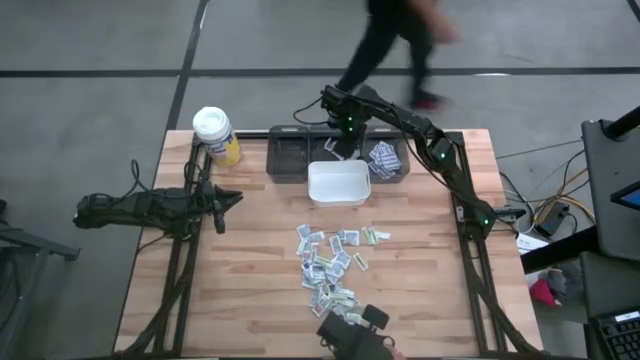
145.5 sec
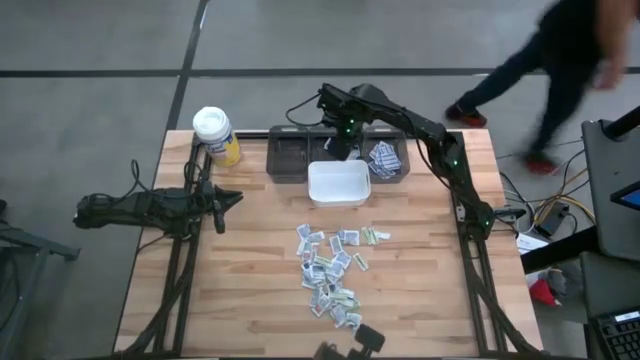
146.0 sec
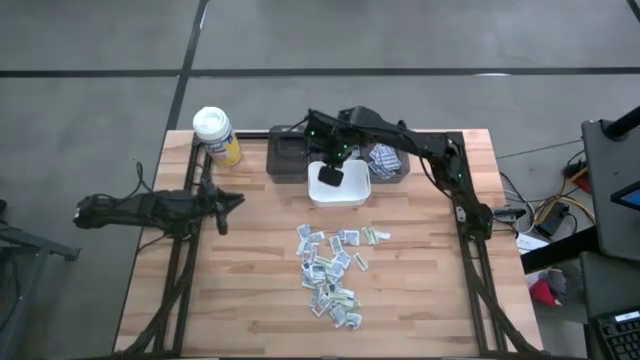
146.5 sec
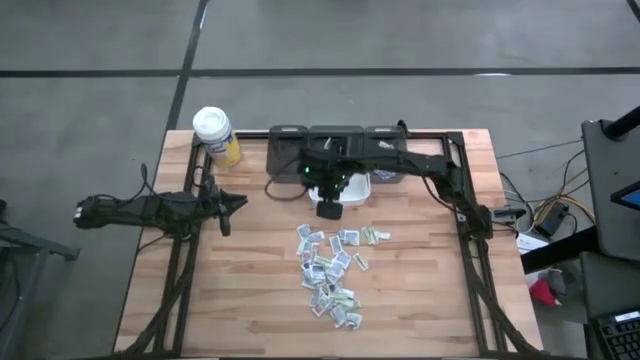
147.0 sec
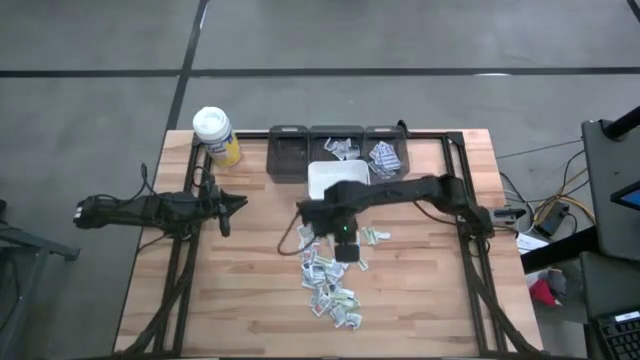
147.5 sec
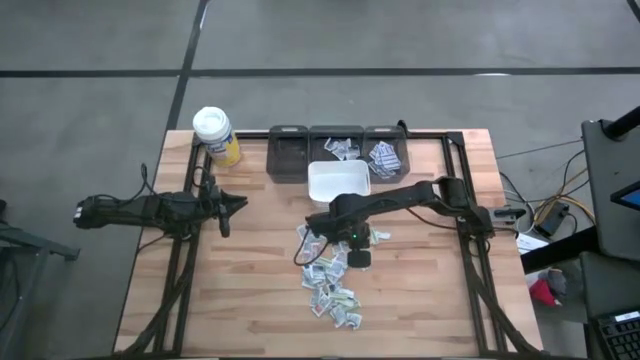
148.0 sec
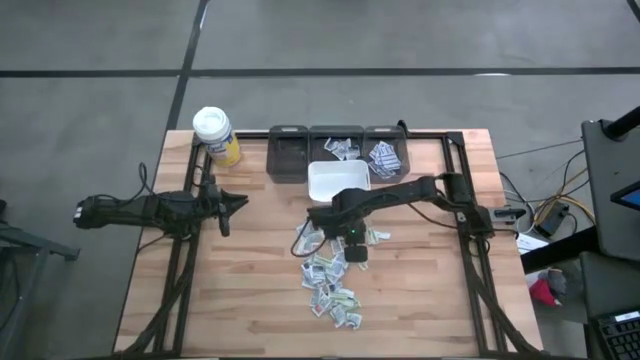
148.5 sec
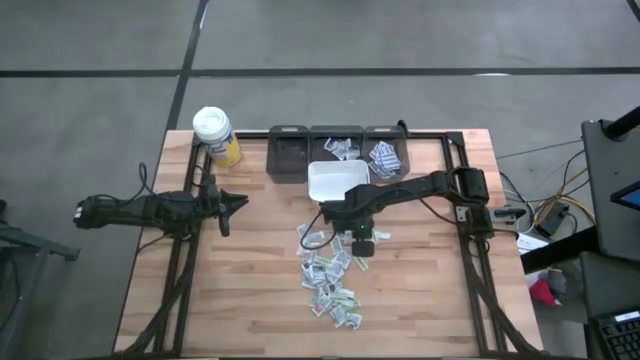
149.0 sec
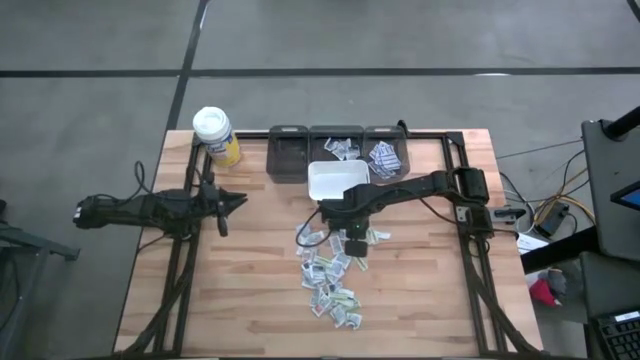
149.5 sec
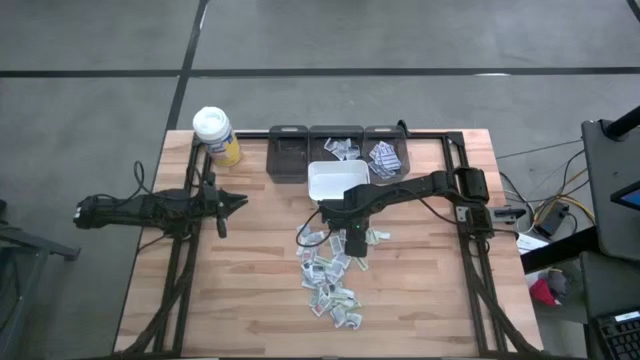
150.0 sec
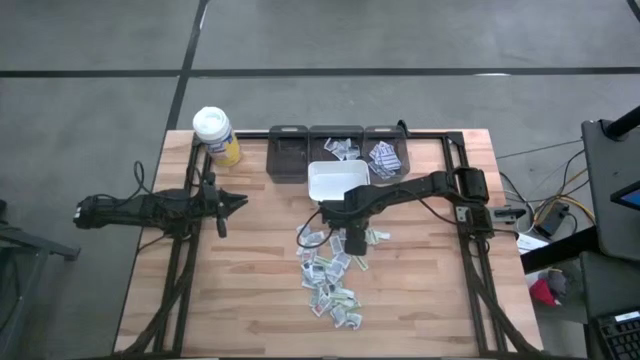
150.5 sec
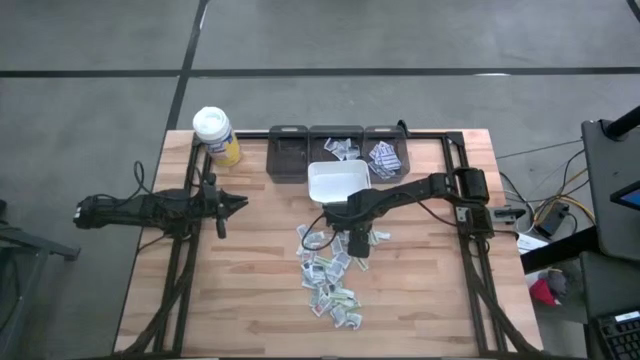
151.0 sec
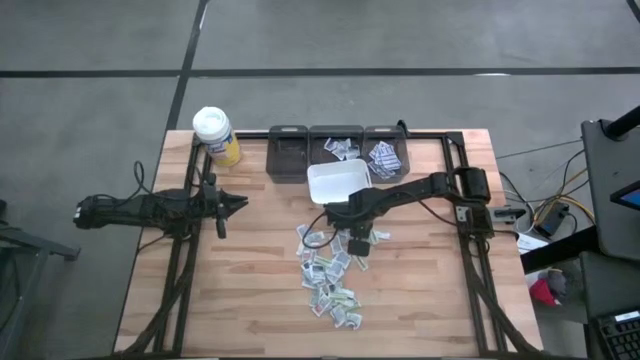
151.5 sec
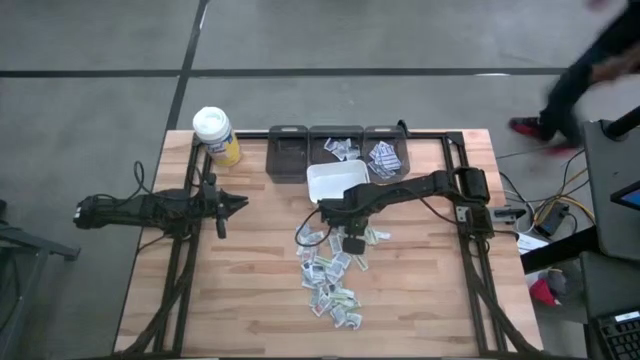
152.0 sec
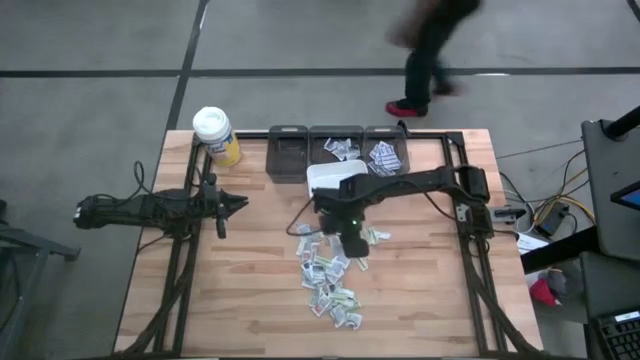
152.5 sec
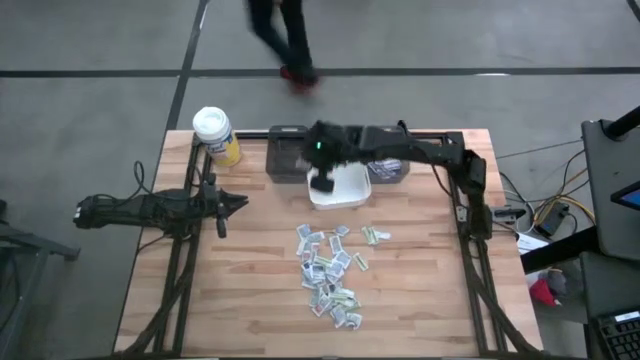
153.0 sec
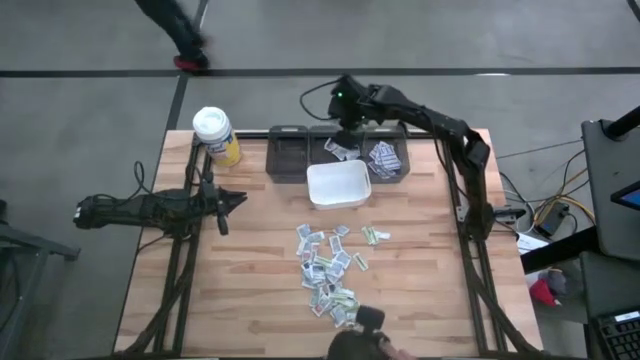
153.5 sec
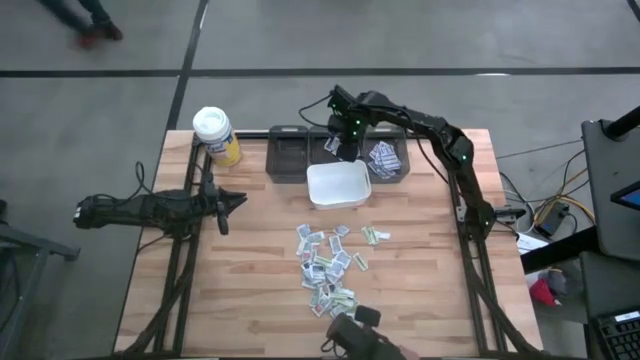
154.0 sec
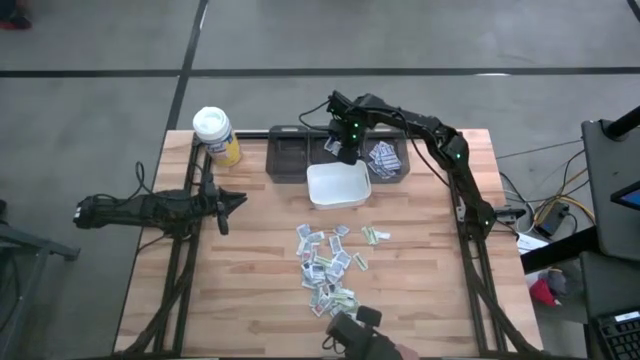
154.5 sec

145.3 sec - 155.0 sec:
Task: Pick & Place First Aid Supplies
Put the alcohol pad into the middle black bin

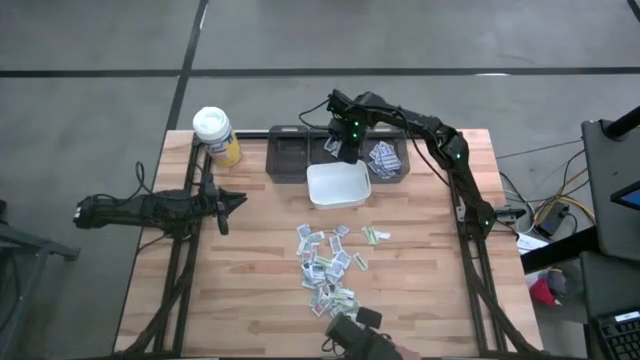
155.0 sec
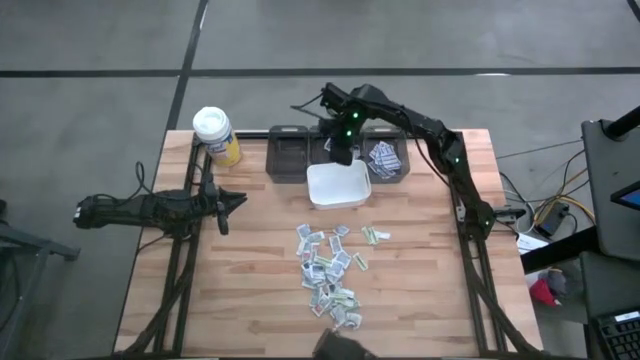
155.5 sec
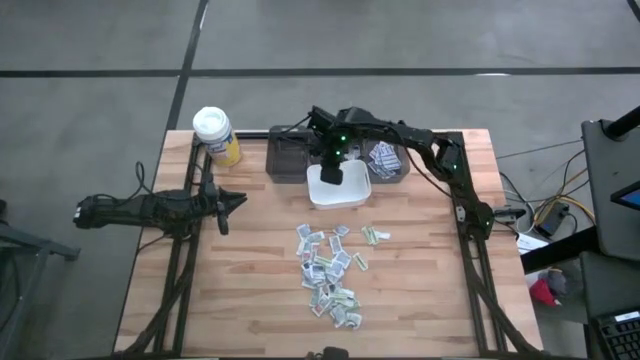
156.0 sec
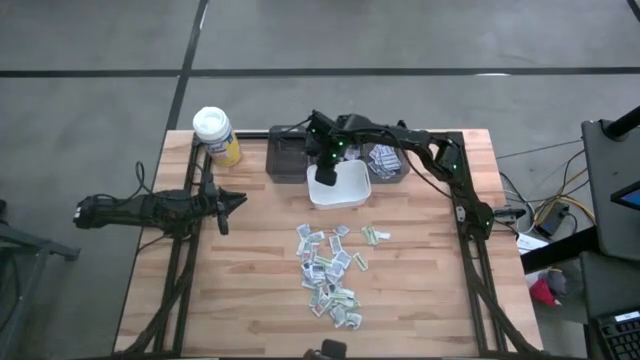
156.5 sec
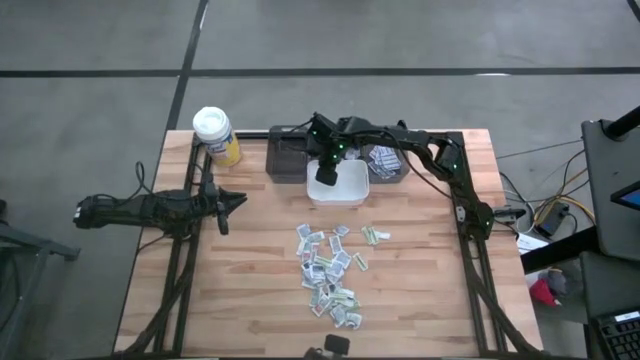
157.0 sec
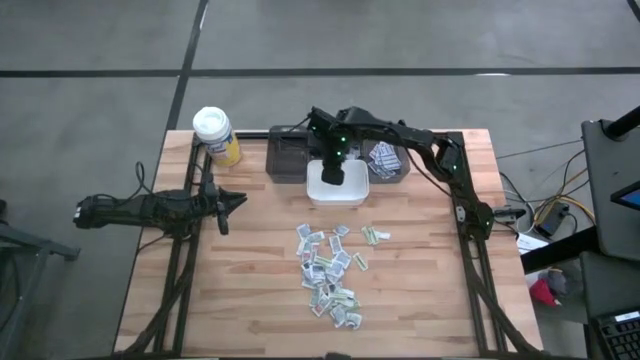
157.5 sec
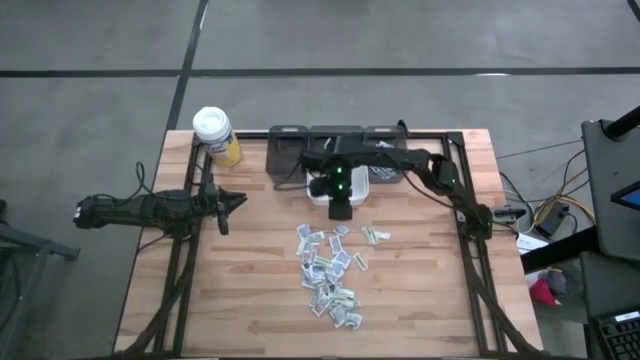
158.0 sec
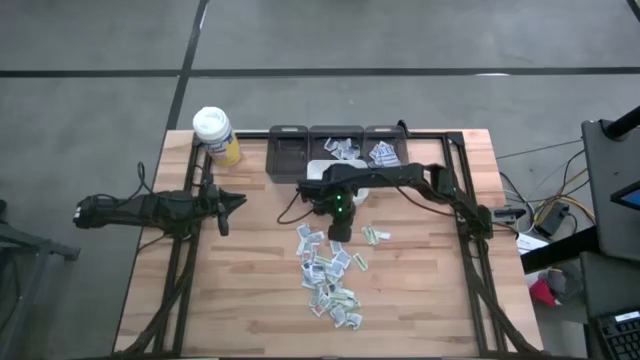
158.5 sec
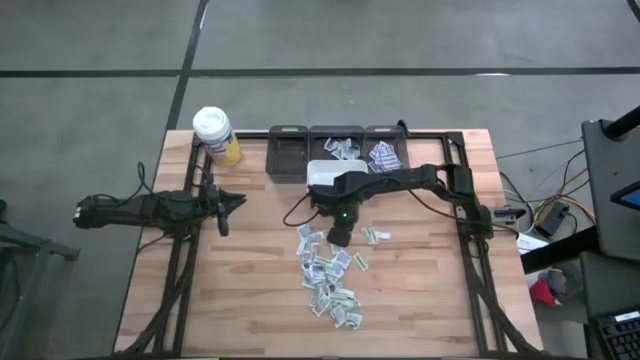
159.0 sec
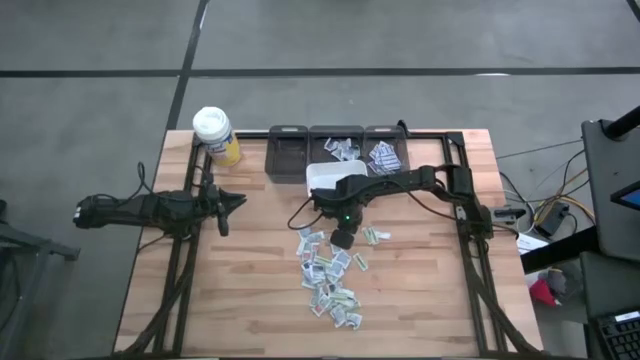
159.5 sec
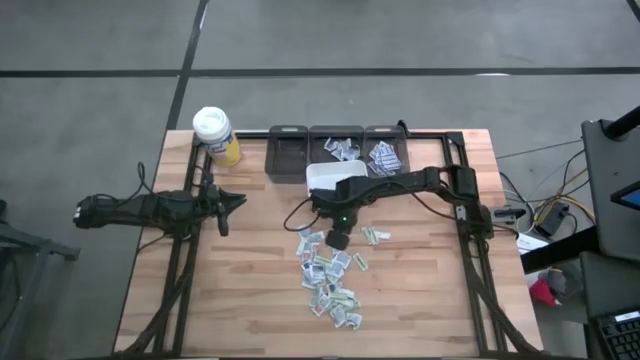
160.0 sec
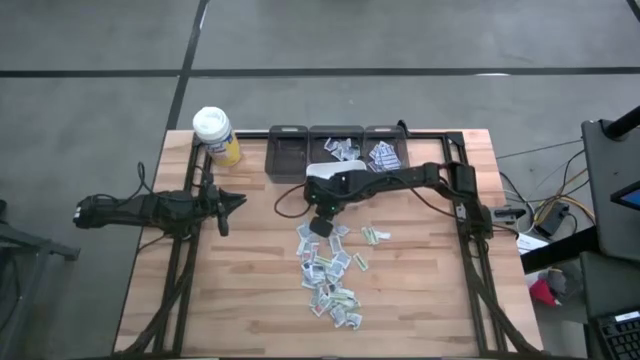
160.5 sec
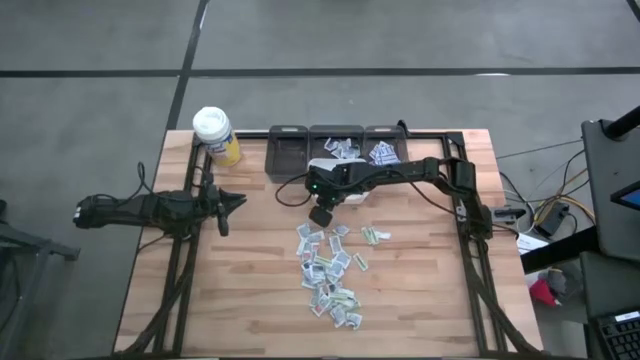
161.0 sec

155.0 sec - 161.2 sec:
Adjust the white bin

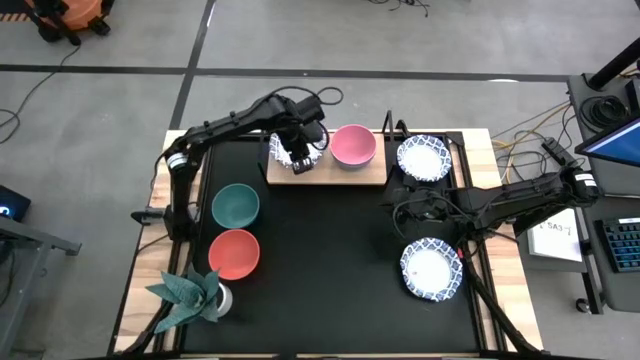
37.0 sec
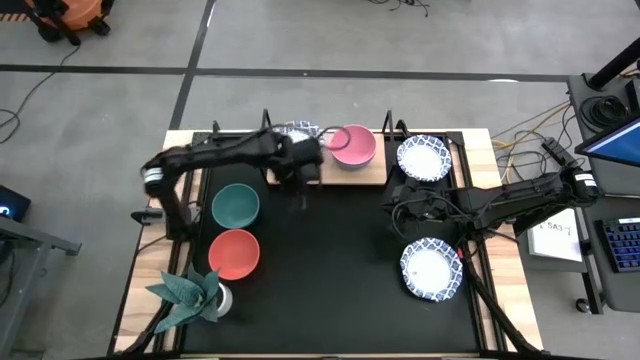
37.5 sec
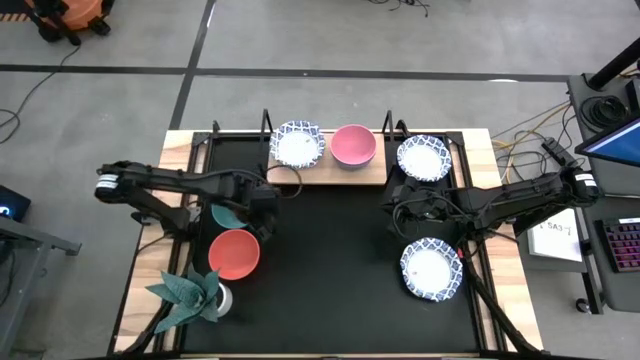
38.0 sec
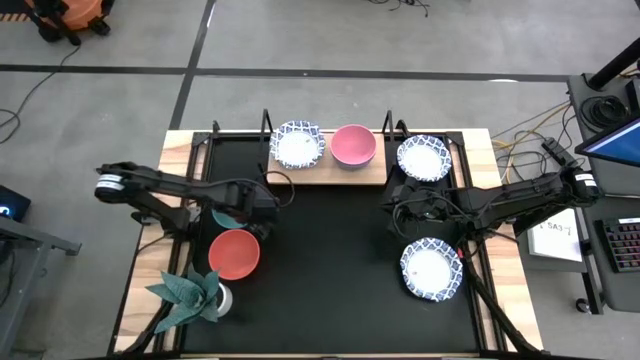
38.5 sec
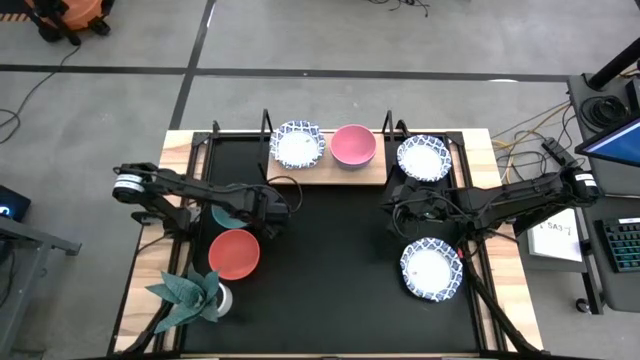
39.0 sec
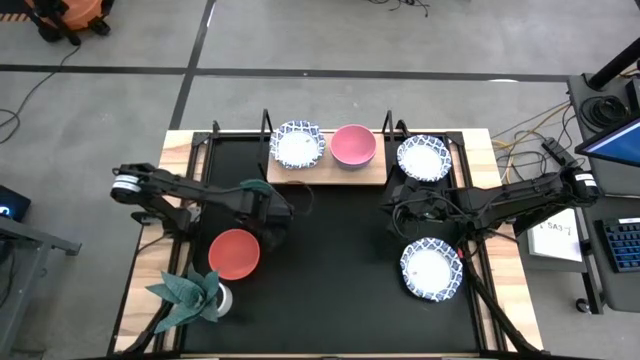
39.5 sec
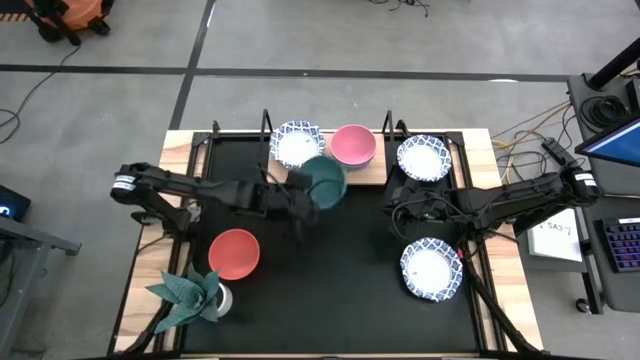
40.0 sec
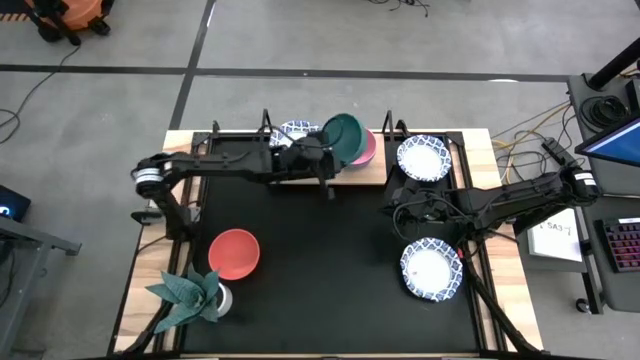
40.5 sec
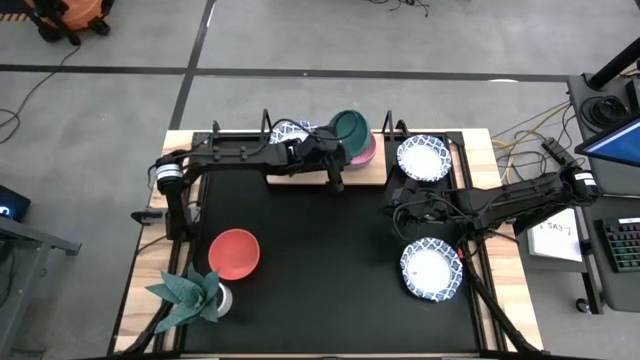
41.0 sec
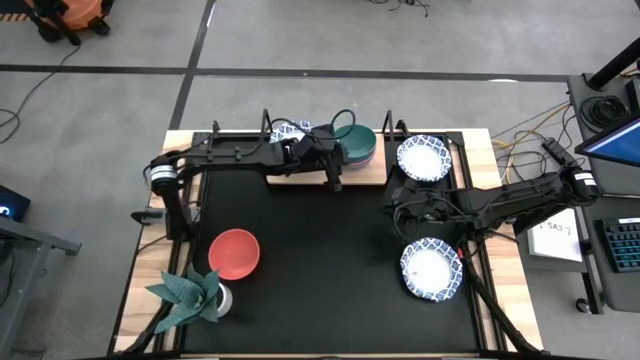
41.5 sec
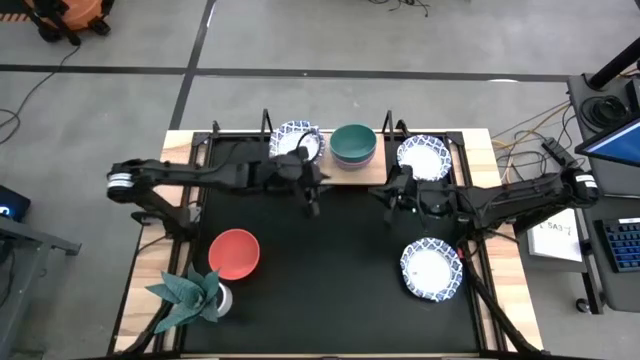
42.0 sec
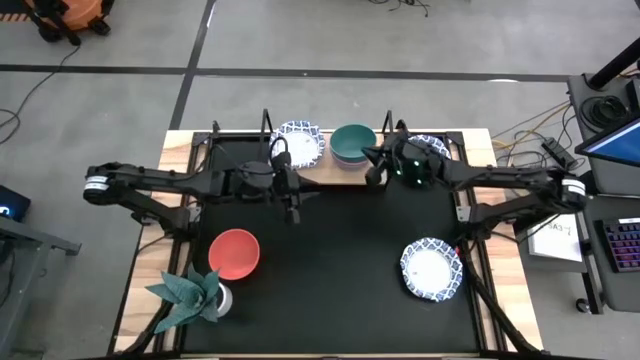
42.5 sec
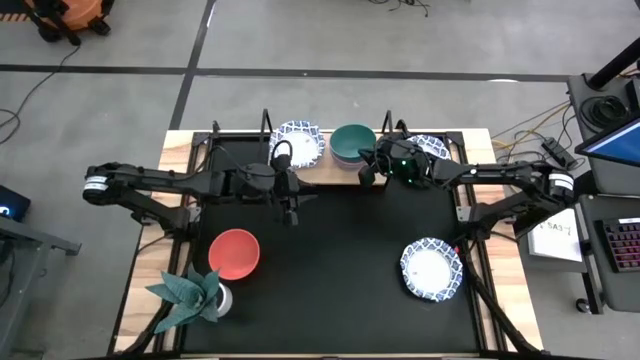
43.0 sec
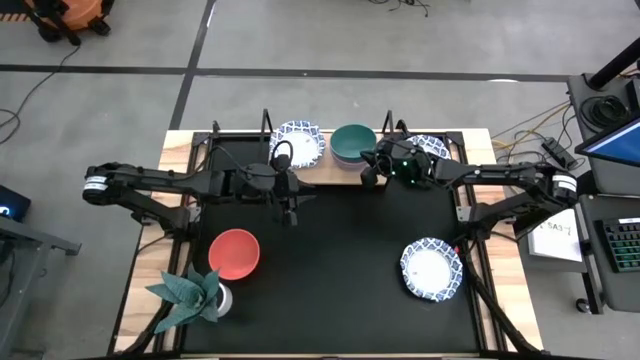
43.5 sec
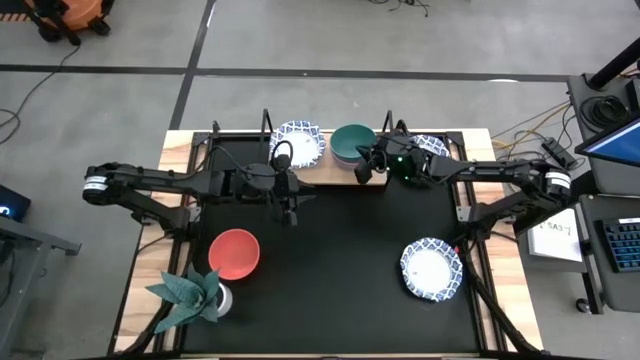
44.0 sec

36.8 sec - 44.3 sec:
Task: Place and stack bowls onto a shelf
Stack the green bowl on the top of the pink bowl on the shelf
